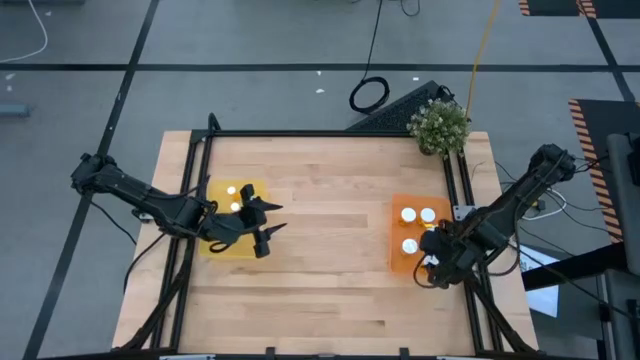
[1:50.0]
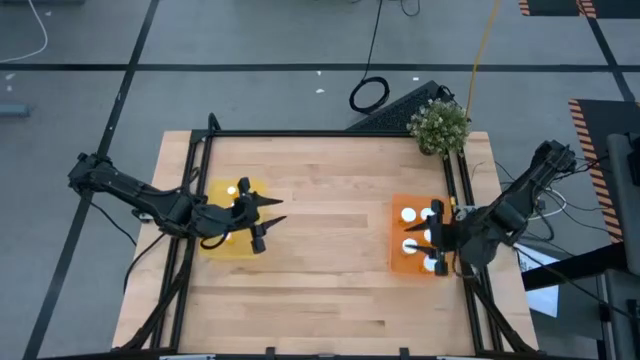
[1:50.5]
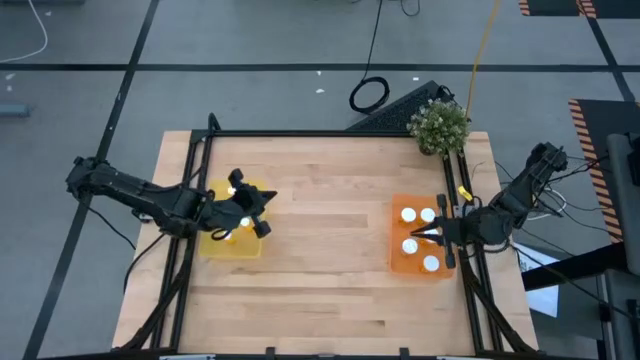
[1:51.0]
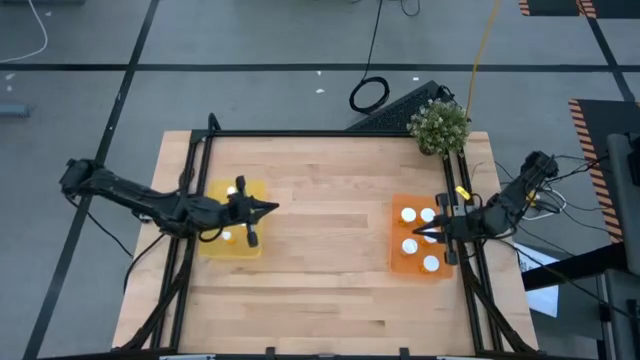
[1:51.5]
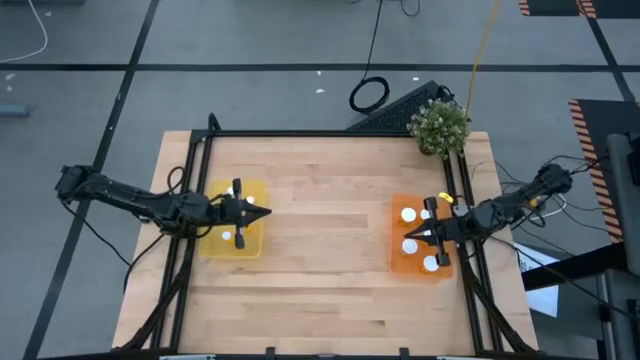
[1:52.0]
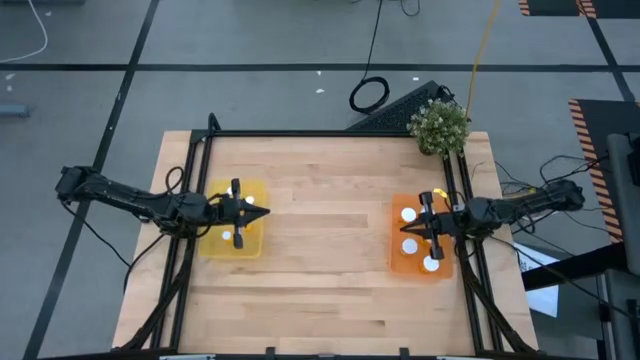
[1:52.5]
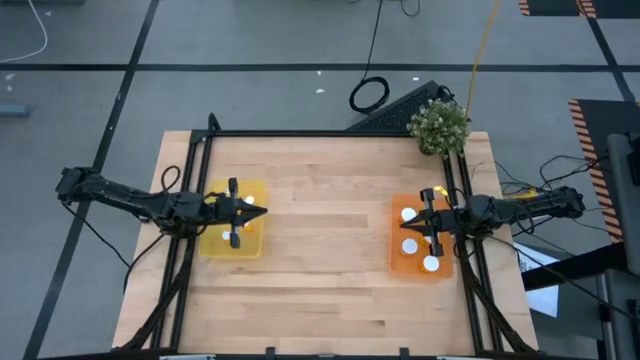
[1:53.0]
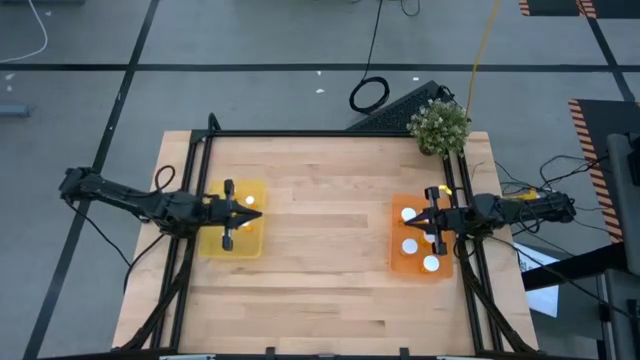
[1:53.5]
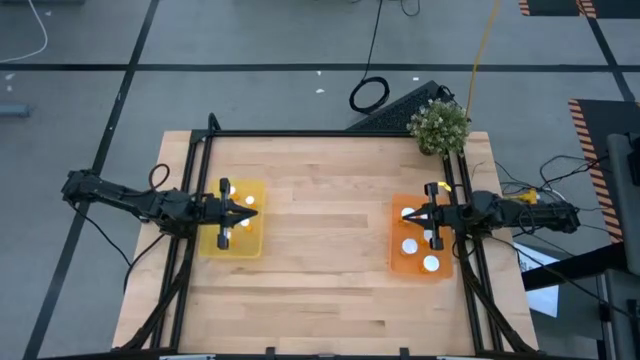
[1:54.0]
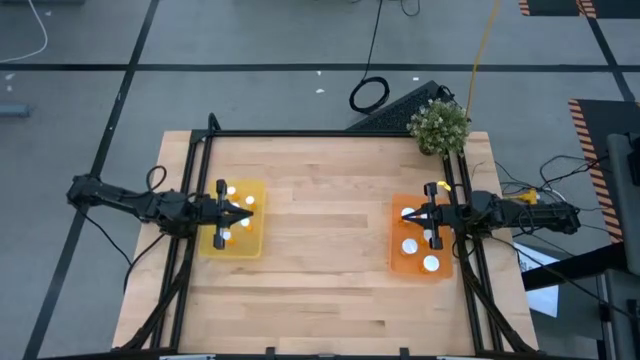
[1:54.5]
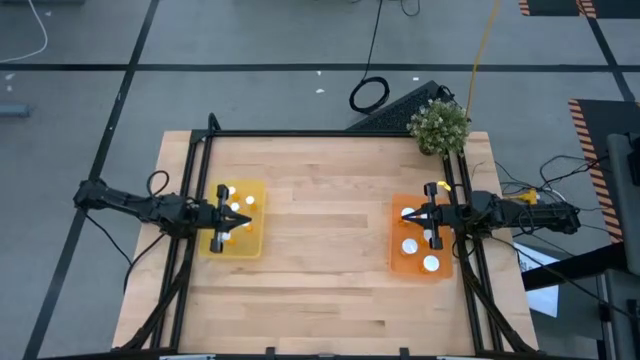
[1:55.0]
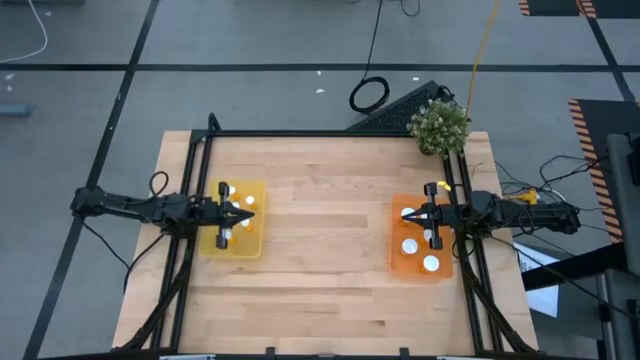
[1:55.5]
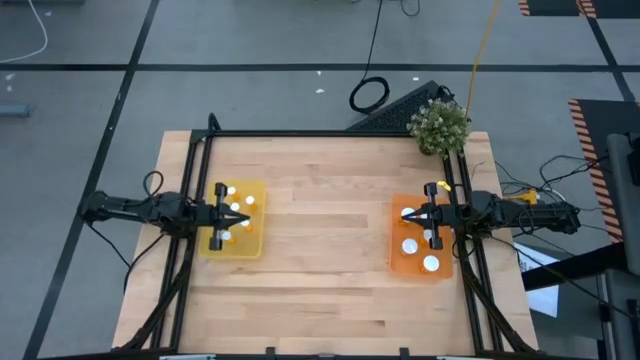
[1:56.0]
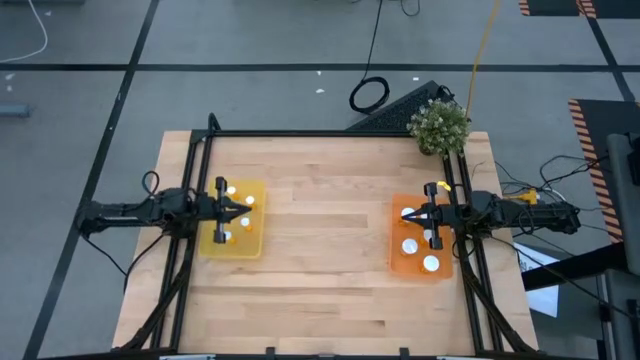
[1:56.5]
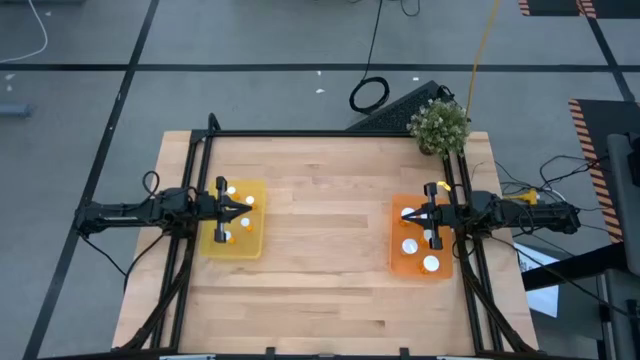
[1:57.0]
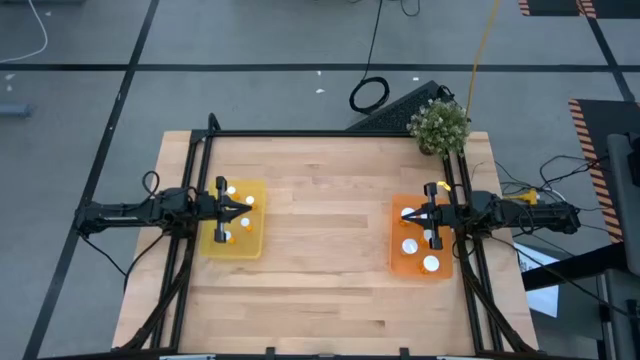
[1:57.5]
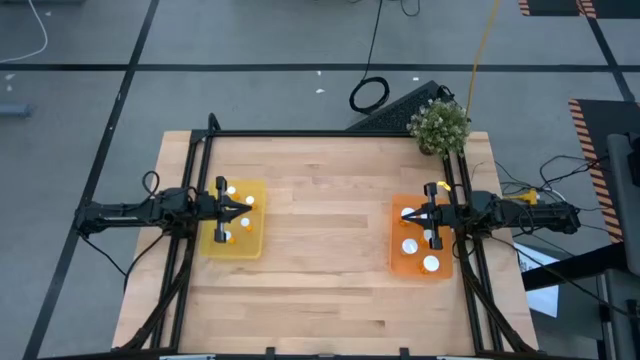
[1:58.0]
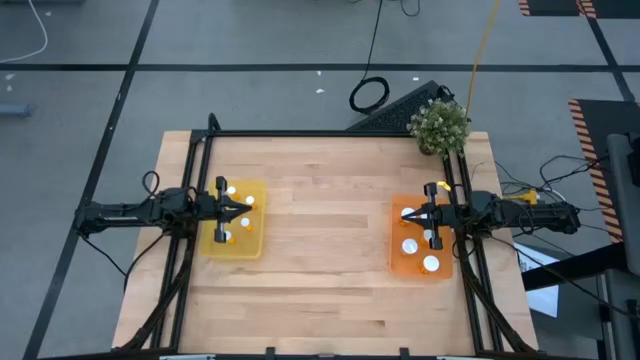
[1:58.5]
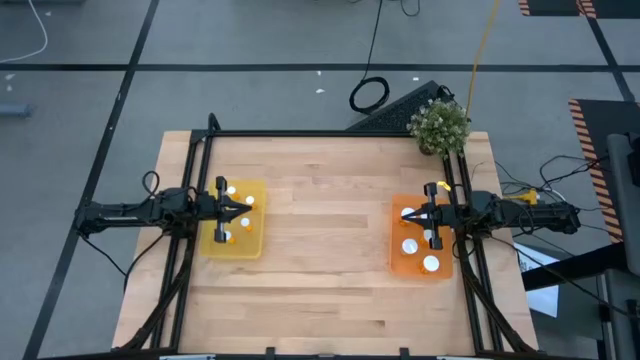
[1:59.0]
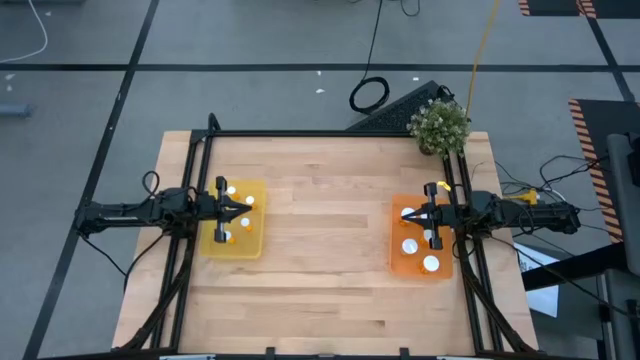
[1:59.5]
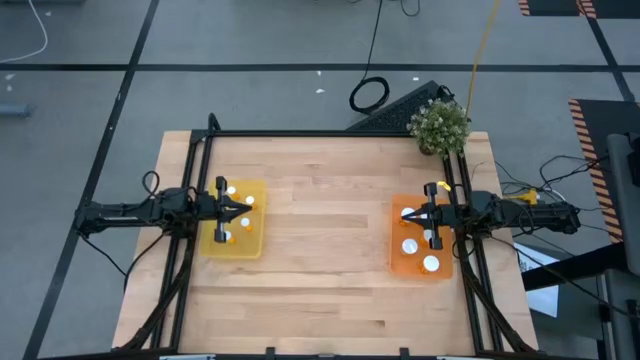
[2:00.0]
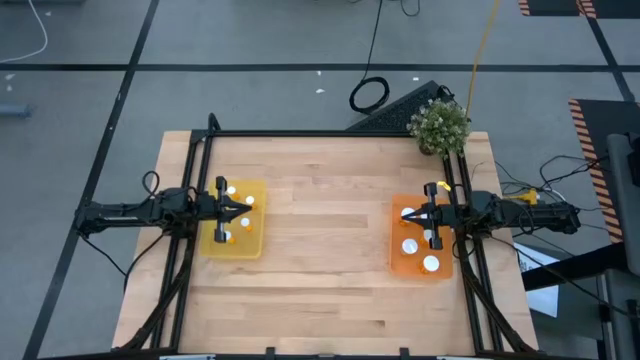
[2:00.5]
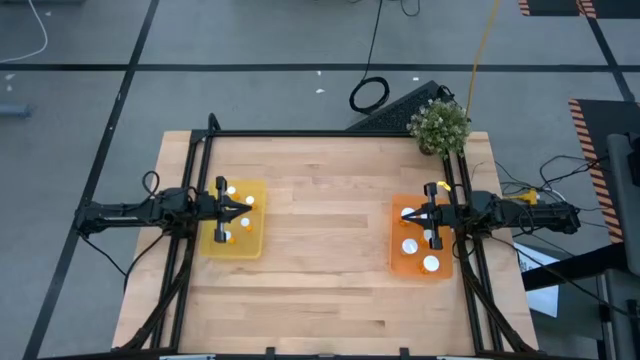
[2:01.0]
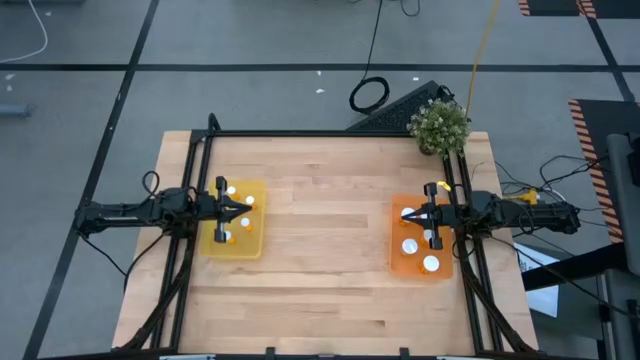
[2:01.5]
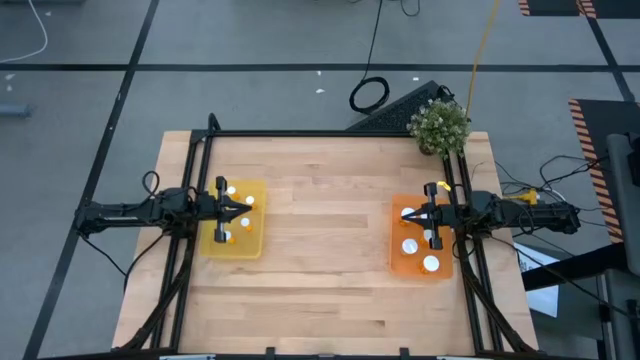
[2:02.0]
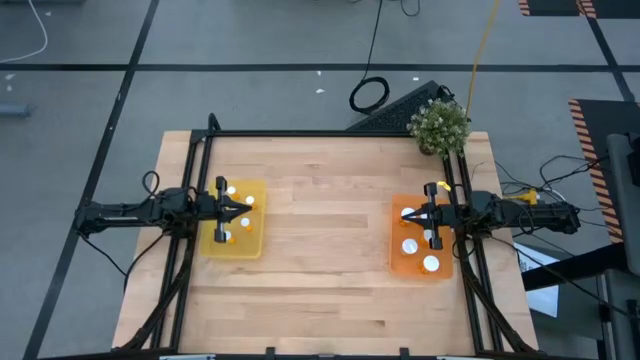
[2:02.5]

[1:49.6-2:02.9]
Task: Pick and place medicine bottles into bin by pill shape (circle, oval)
Return to Home Position

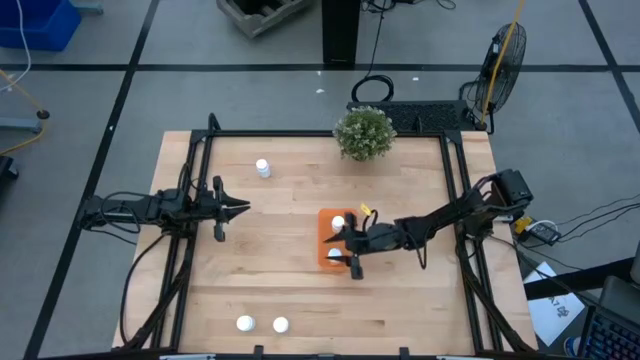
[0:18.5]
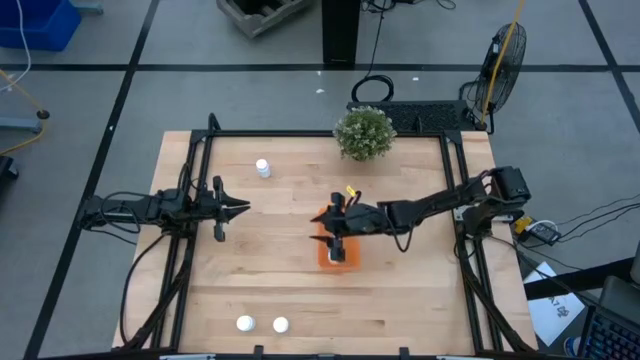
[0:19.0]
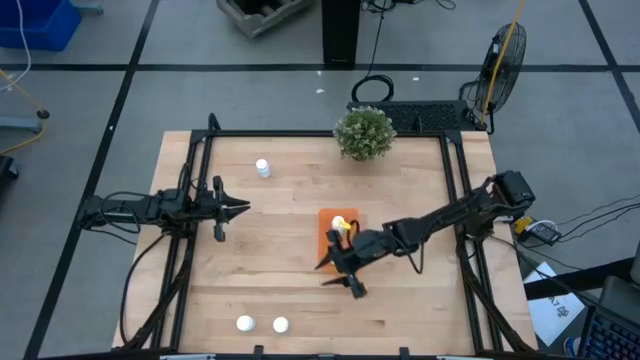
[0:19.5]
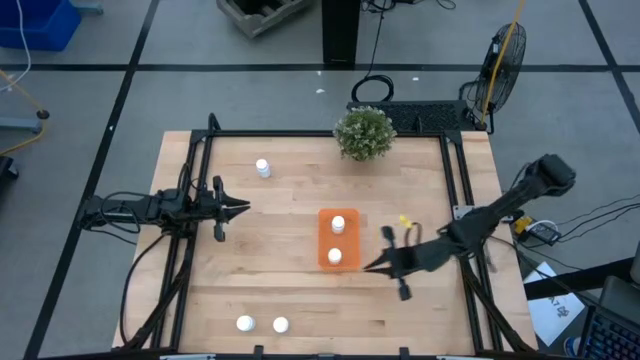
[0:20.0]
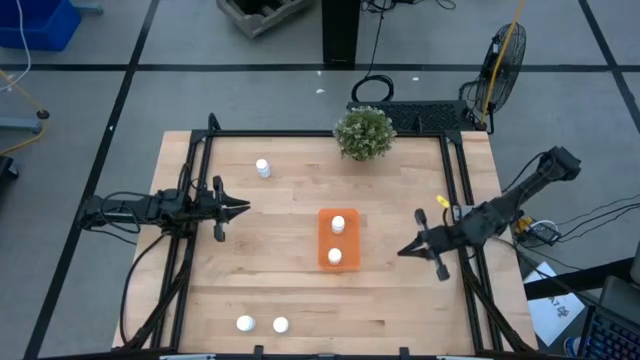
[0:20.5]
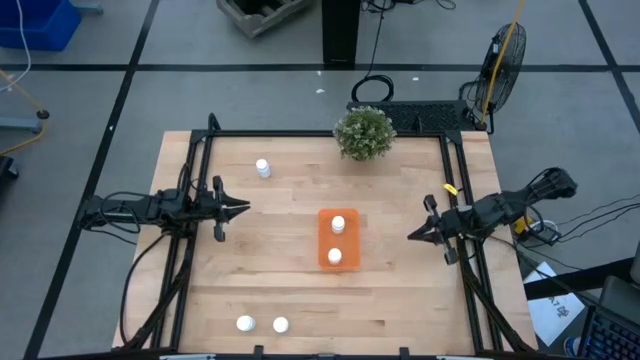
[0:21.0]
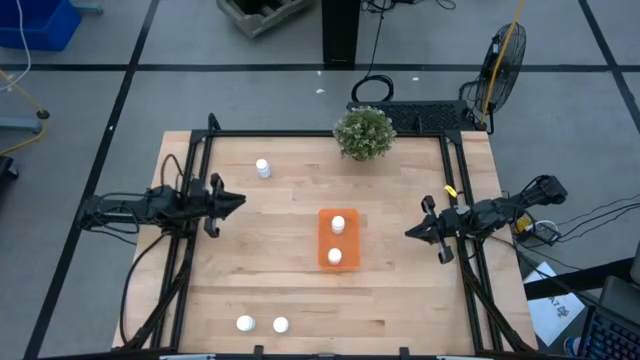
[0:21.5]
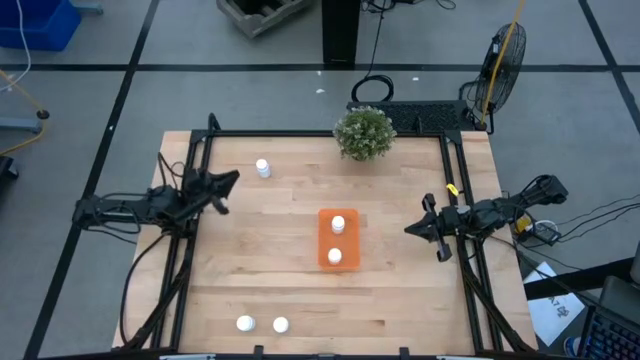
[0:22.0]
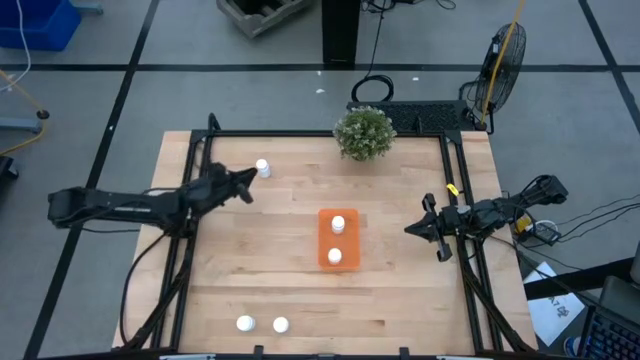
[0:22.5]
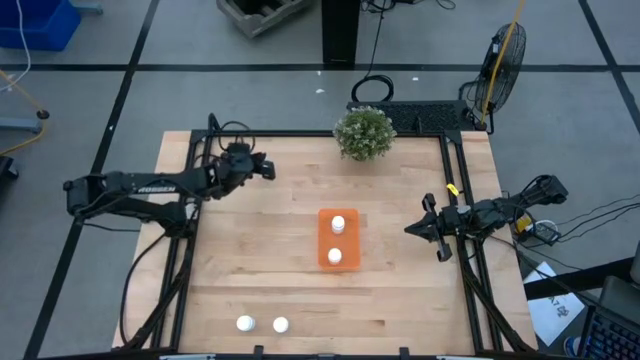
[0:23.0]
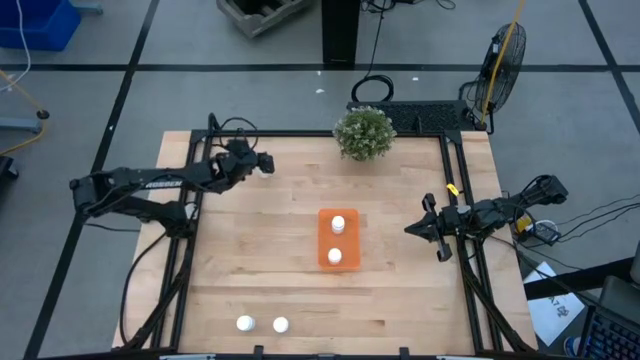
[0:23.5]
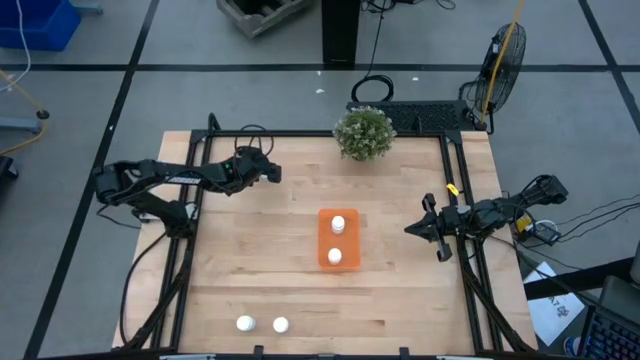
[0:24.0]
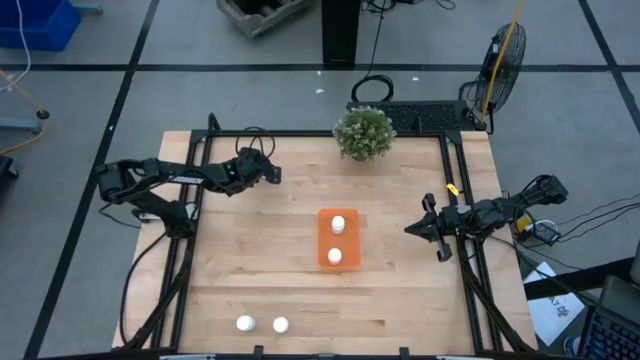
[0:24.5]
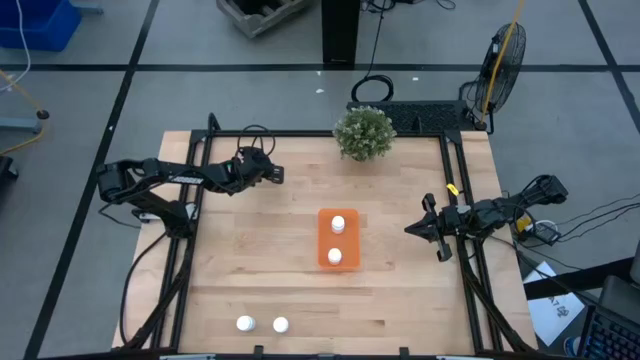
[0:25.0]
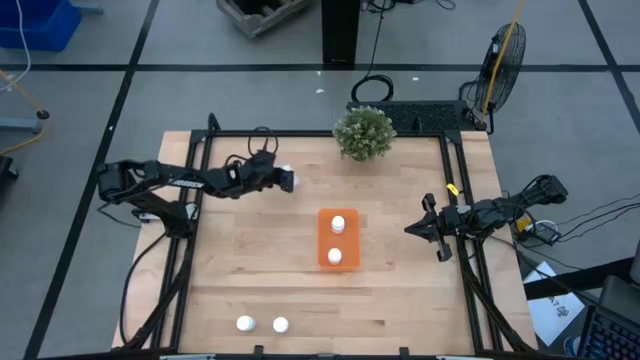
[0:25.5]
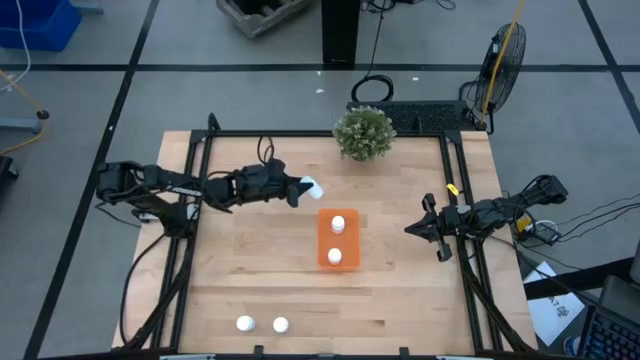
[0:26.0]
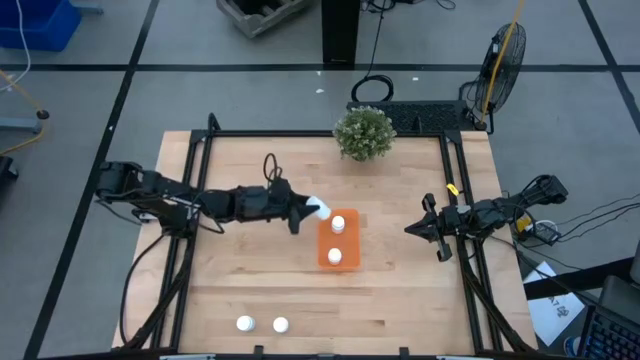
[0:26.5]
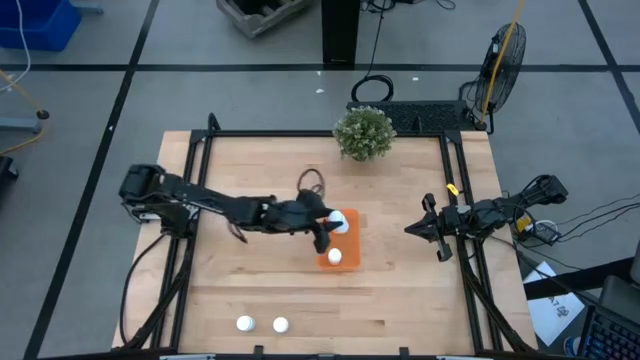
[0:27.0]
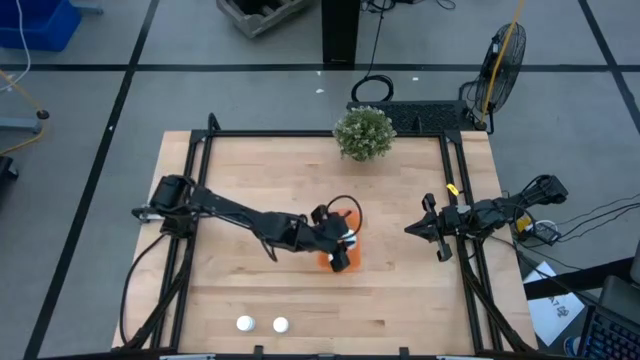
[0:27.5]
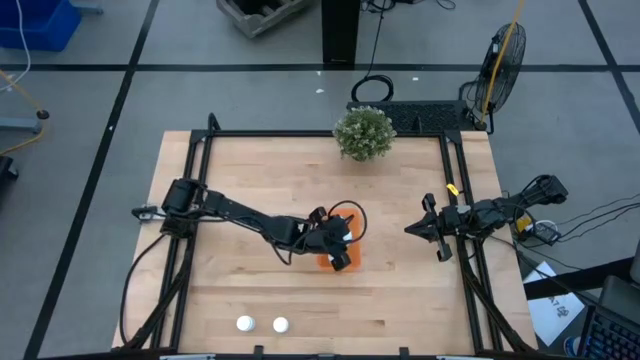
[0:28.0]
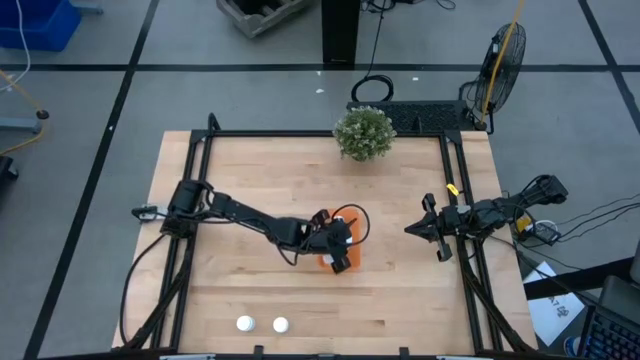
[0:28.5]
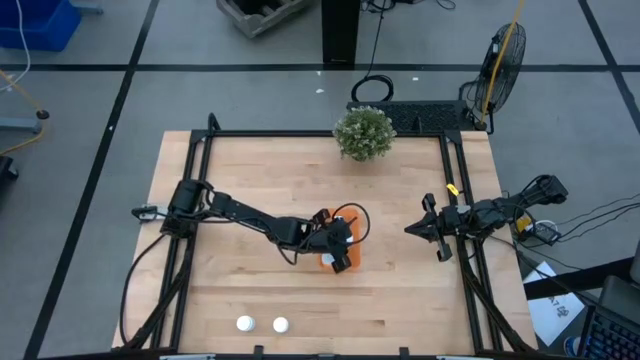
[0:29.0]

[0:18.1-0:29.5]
Task: Pick and place pill bottles into a basket
Put the white medicine bottle into the orange bin
